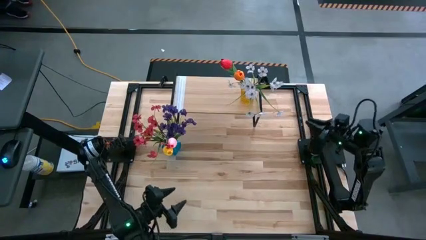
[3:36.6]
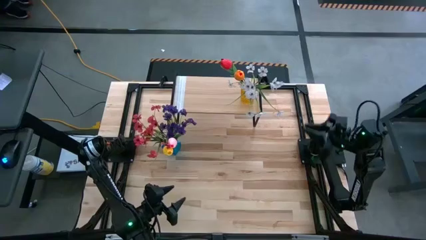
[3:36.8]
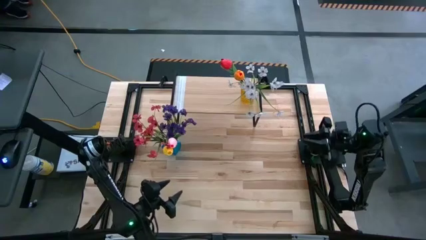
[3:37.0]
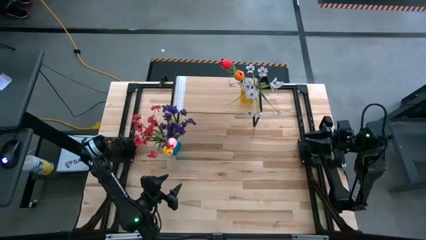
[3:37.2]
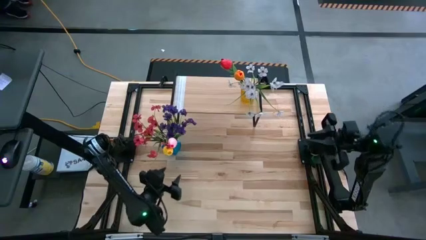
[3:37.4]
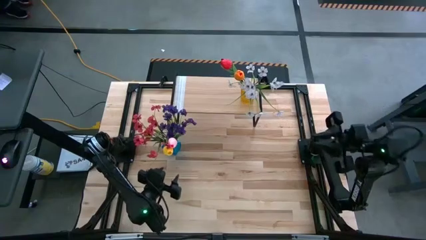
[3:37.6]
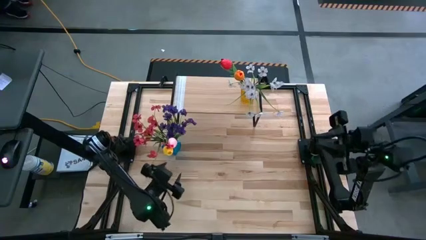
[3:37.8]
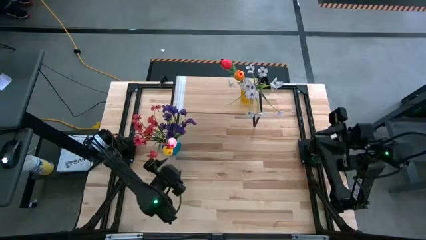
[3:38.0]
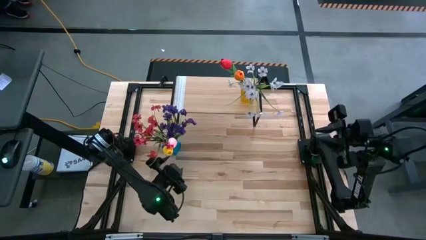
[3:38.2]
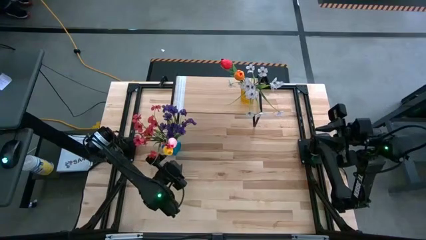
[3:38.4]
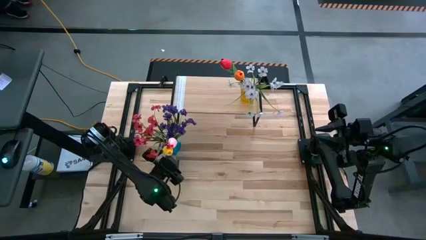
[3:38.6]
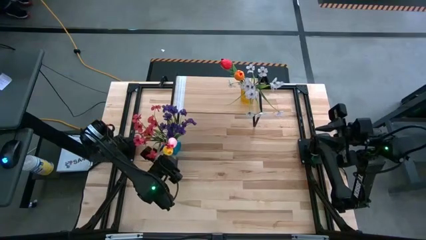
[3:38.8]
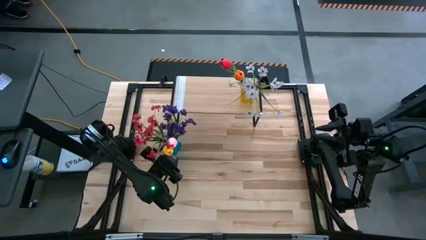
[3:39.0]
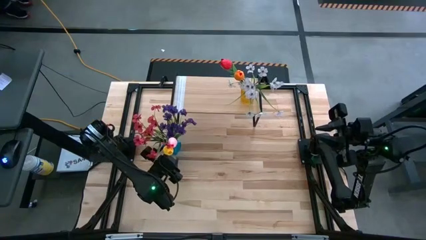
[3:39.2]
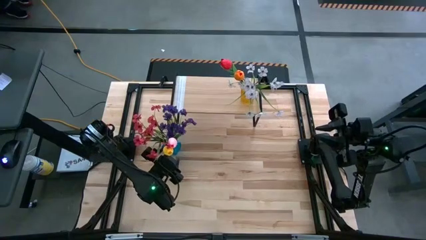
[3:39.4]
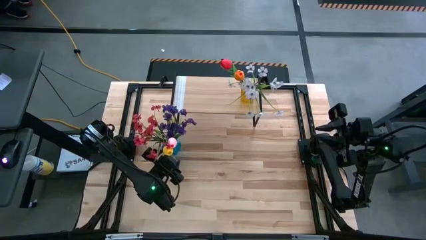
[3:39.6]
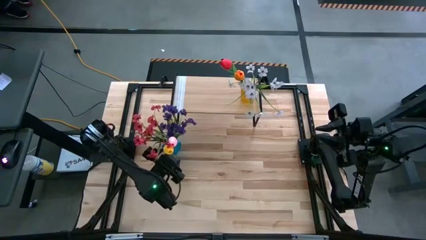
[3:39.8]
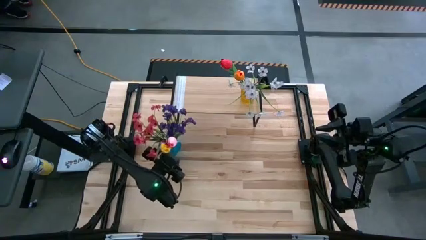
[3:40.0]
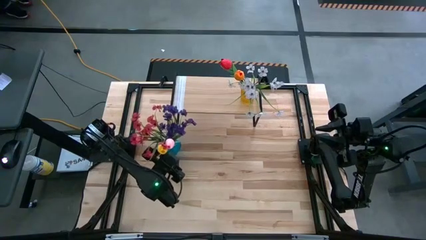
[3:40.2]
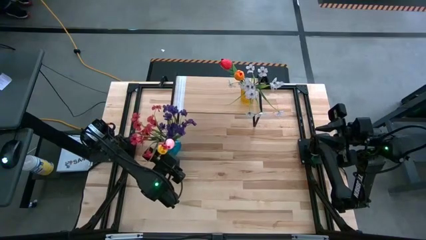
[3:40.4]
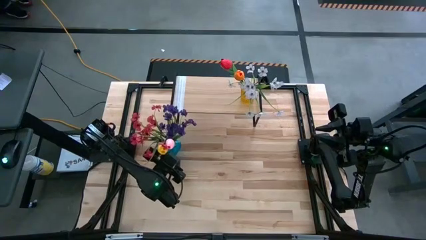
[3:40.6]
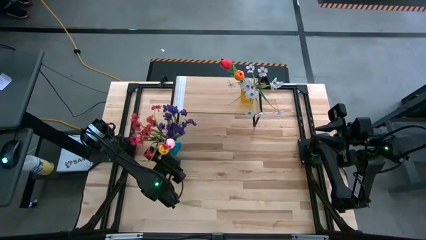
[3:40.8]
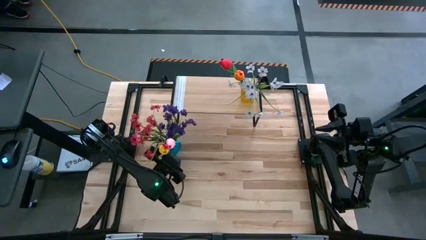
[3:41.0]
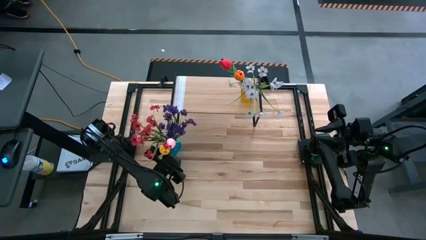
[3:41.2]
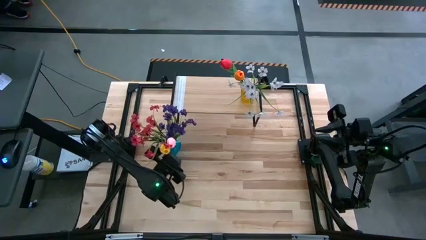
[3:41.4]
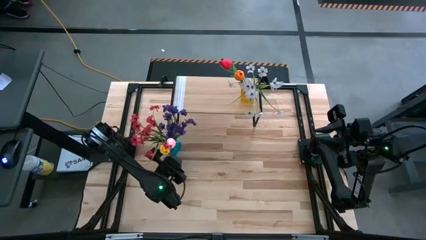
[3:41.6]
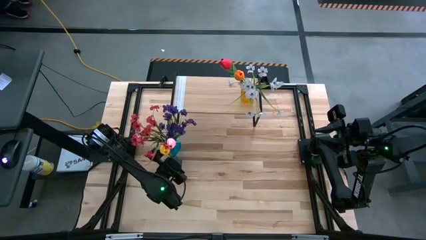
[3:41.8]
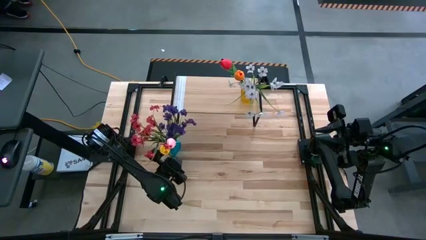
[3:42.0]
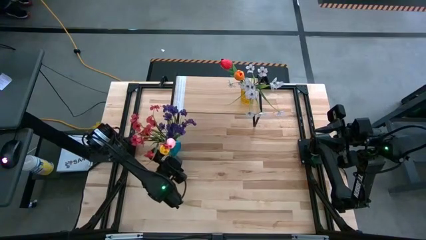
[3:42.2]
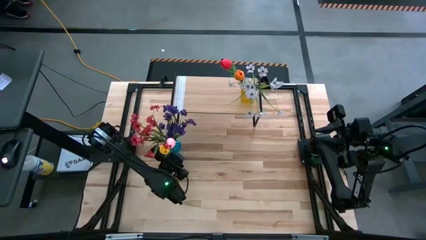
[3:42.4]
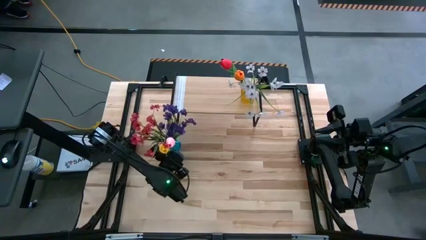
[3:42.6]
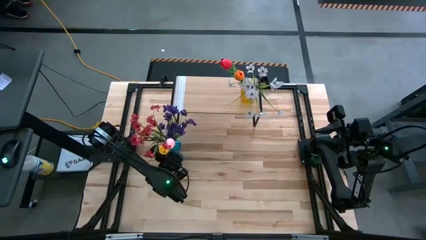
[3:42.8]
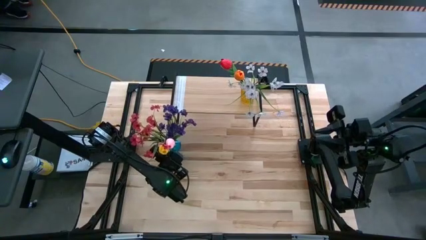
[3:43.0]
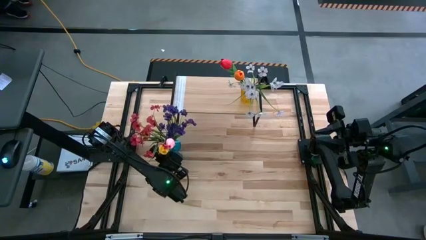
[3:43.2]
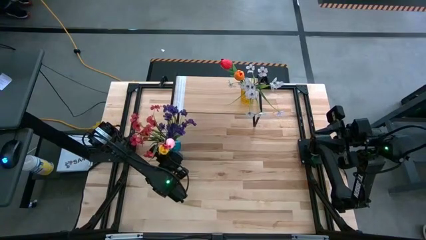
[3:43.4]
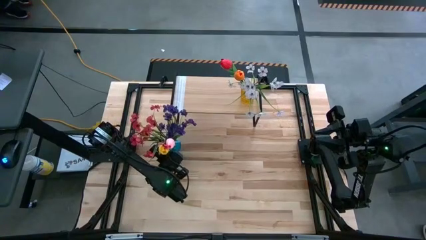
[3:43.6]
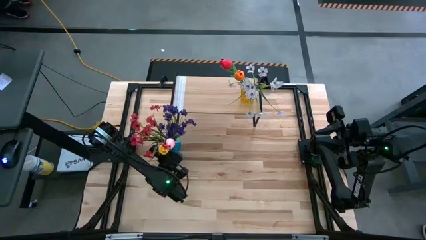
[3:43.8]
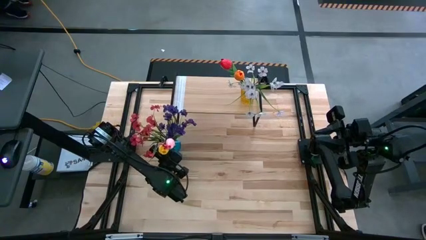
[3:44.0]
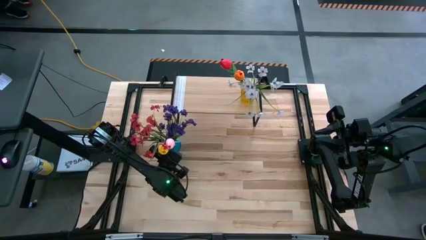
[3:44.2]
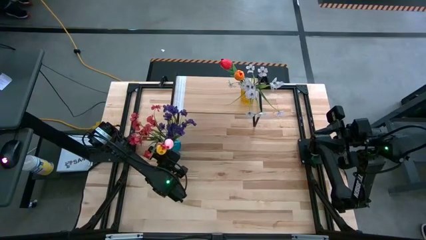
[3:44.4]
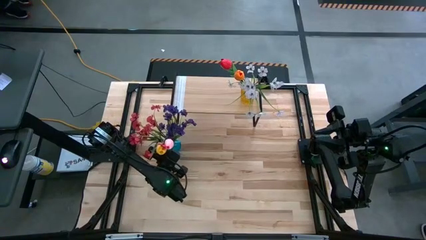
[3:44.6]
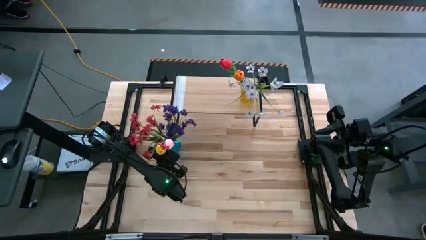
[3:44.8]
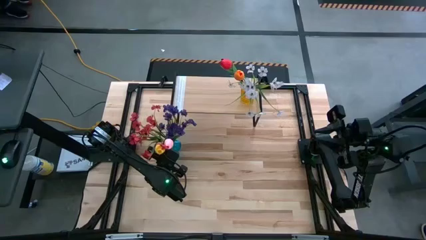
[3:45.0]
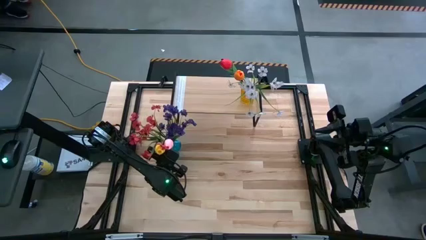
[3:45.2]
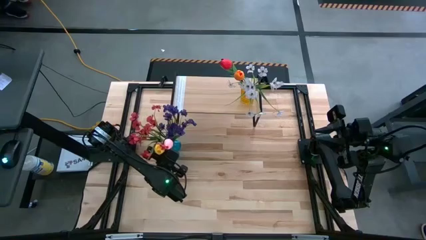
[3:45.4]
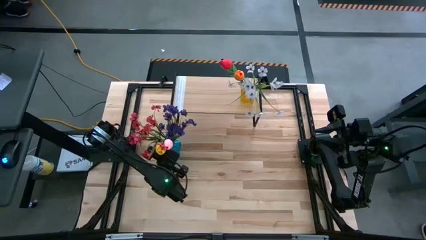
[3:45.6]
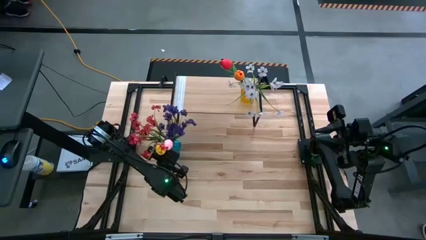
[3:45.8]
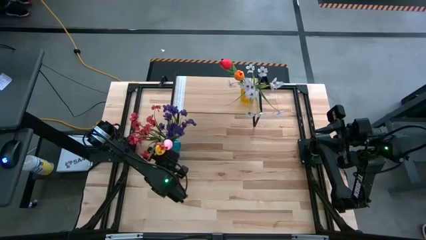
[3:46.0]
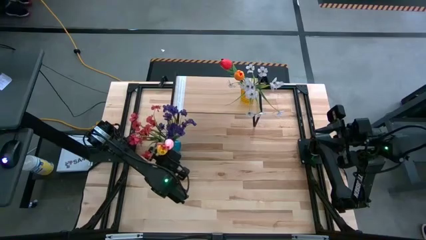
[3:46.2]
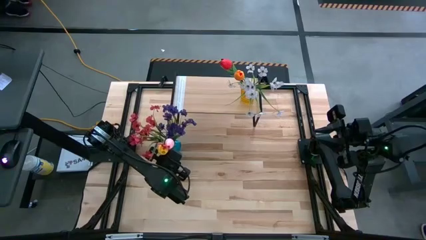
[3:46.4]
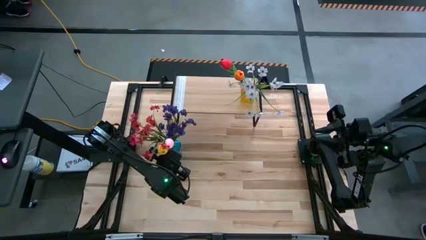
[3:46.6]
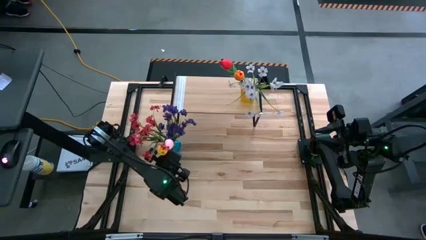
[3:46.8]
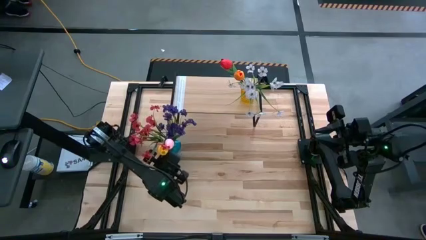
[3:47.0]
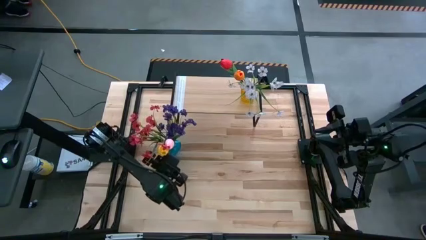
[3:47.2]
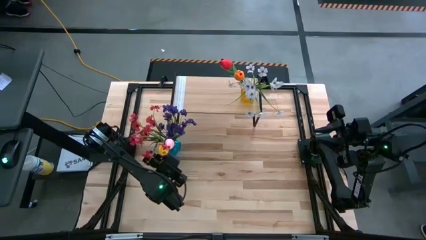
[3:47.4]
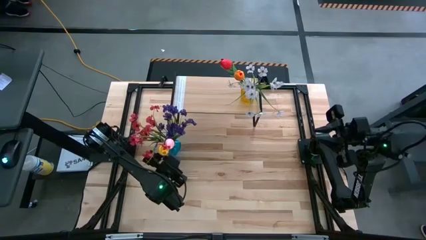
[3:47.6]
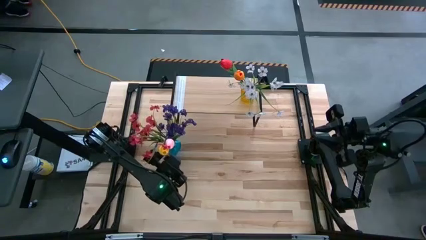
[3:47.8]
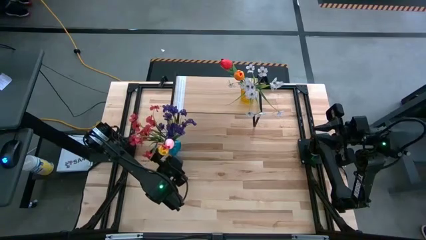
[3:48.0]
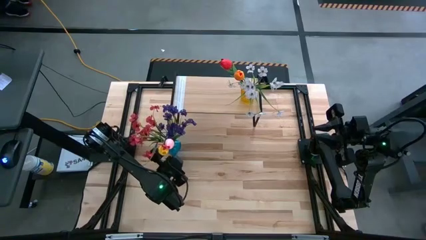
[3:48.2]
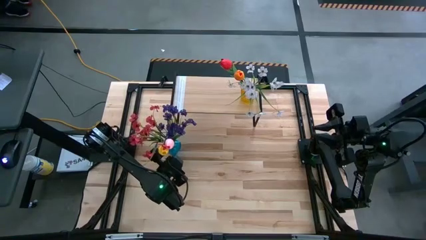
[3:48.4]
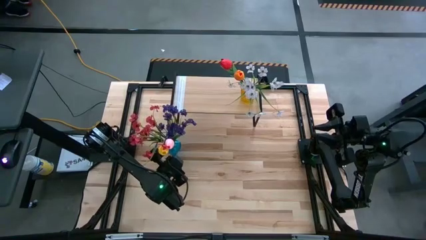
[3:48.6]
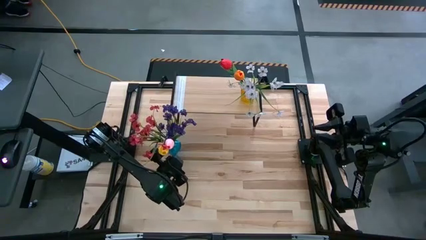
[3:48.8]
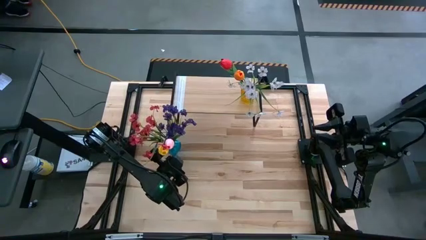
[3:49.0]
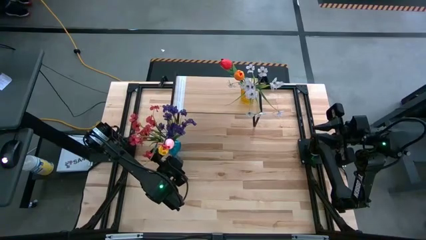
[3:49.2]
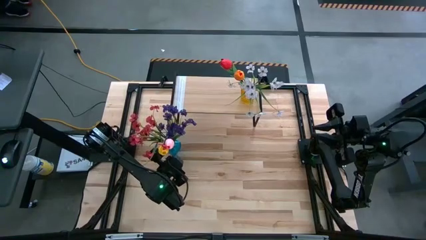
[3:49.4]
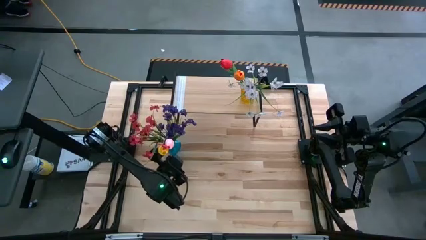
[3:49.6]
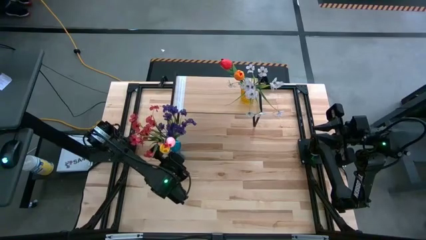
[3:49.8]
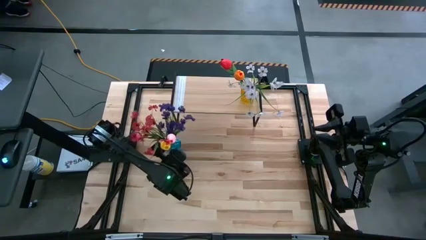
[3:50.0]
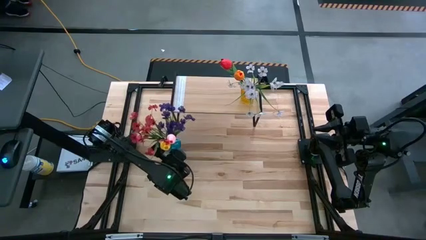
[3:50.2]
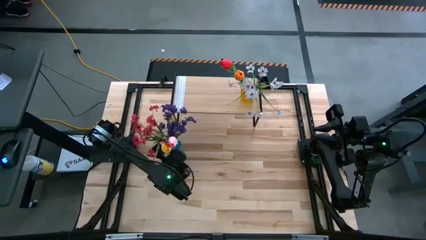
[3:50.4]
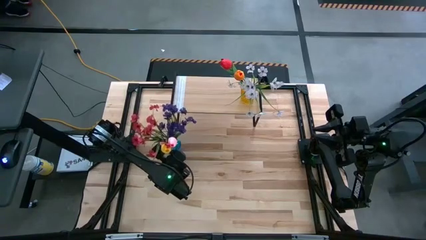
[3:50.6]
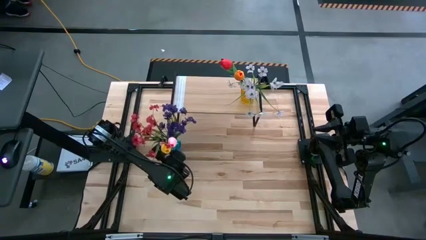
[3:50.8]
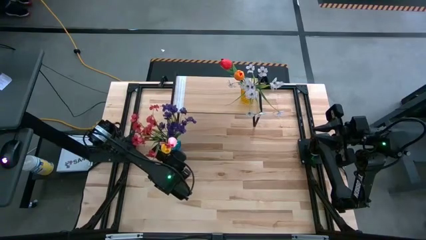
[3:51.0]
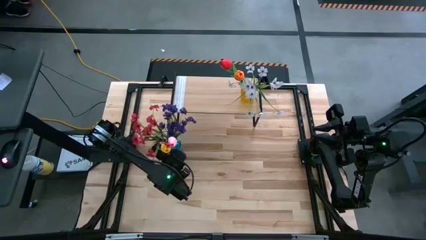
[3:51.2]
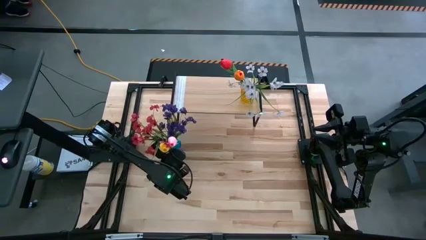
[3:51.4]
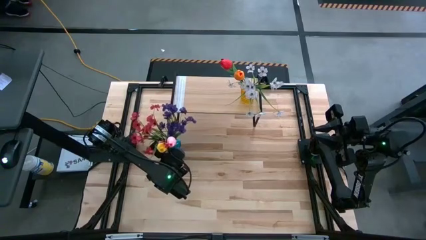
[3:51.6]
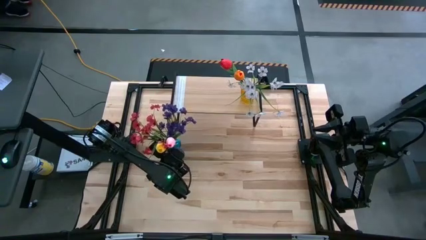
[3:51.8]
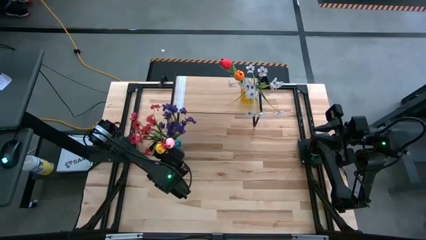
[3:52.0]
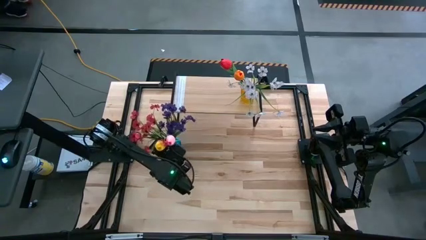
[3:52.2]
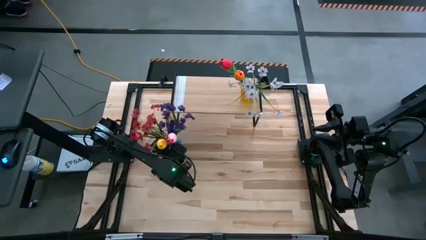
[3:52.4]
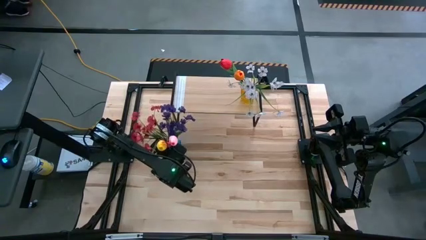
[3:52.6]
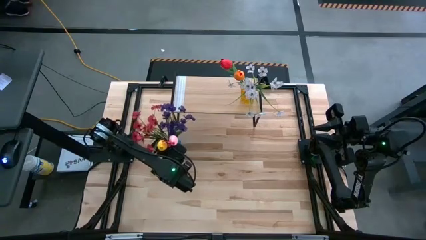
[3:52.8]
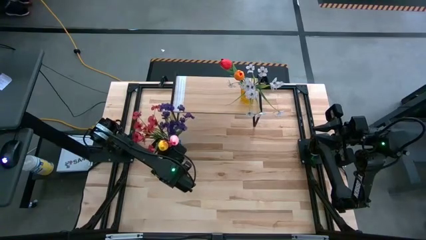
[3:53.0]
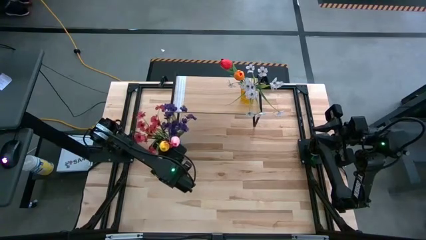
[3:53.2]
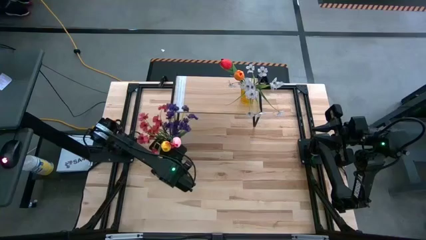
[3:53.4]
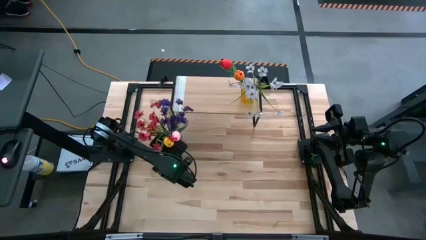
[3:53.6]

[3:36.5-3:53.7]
Task: Pick and place flowers into a vace then onto a shelf
Put the blue vase on the shelf
